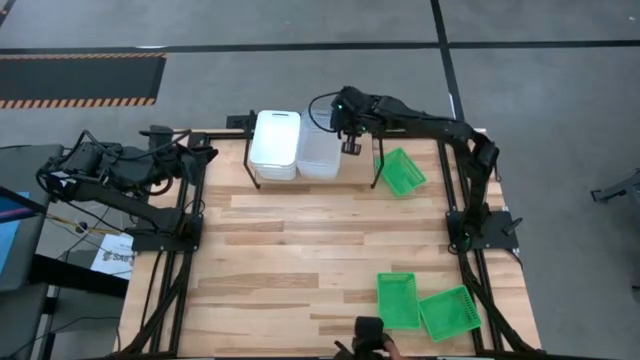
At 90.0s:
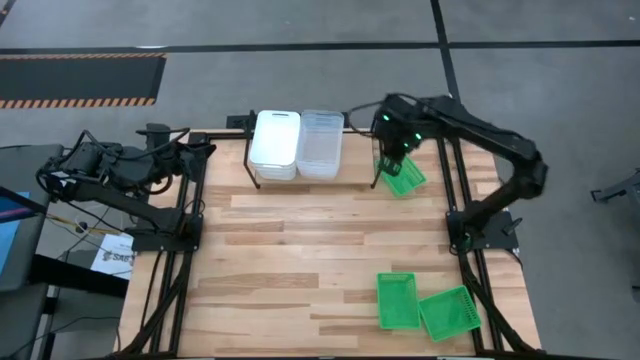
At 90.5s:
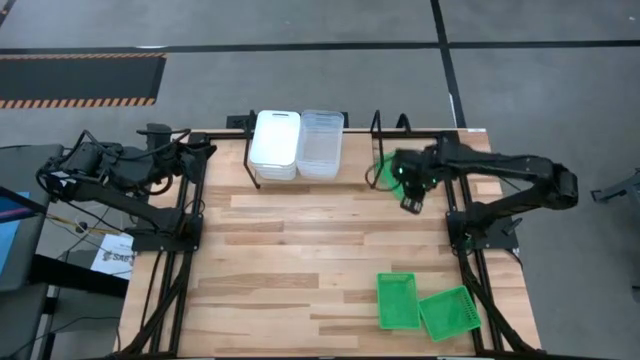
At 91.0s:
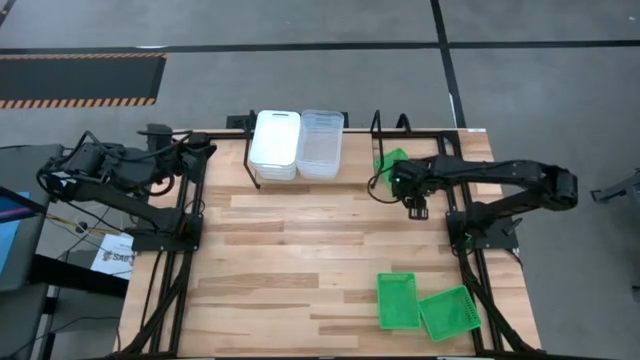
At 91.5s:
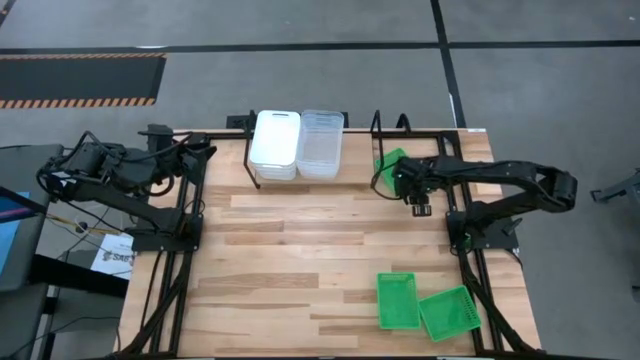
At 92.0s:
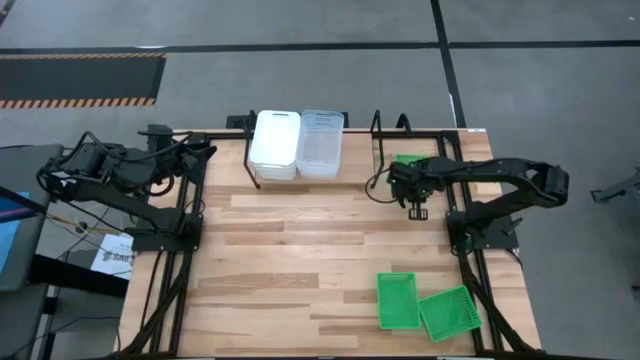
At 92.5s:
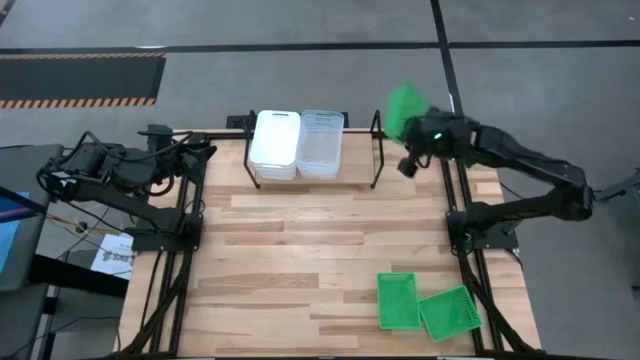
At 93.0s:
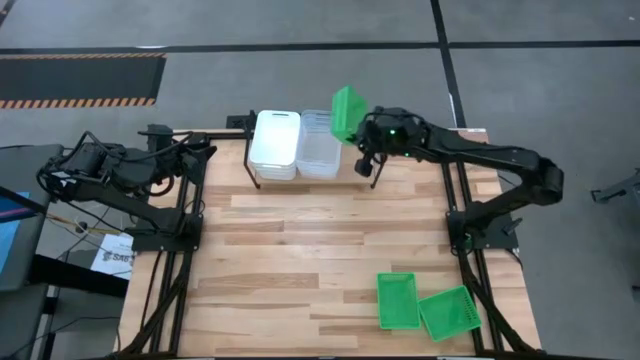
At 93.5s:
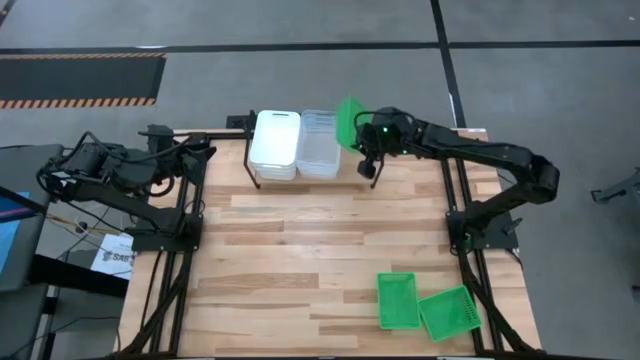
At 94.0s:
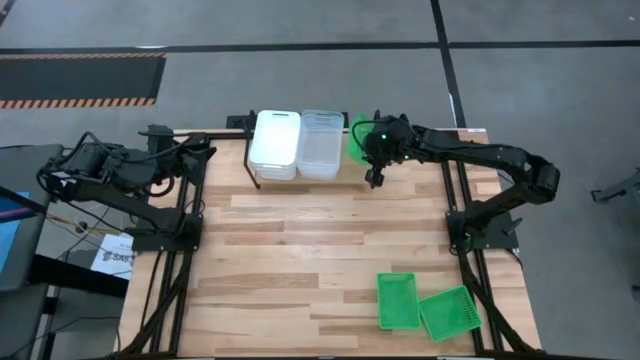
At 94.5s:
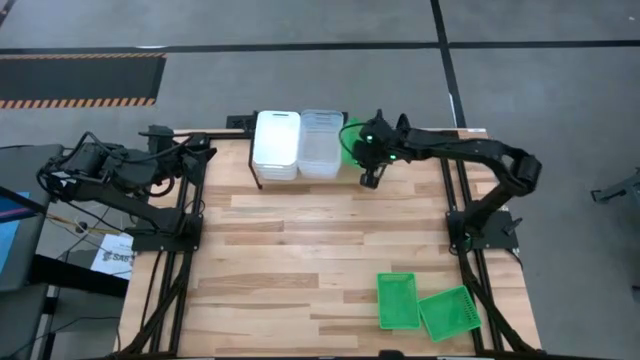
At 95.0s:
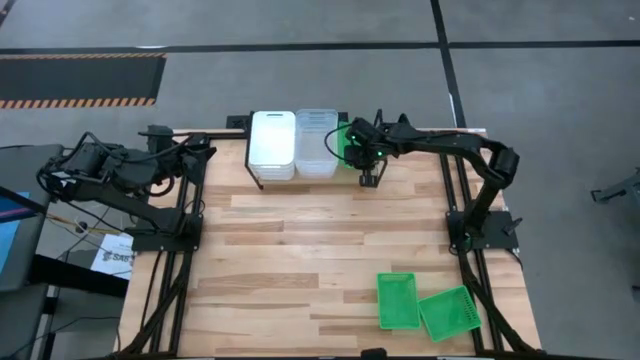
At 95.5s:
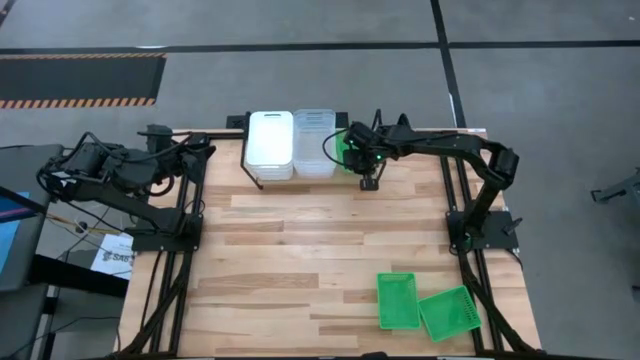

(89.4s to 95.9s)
Task: Stack baskets on shelf by color
Put the top green bin on the shelf

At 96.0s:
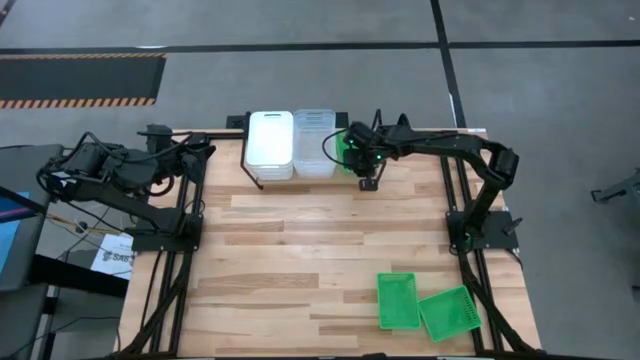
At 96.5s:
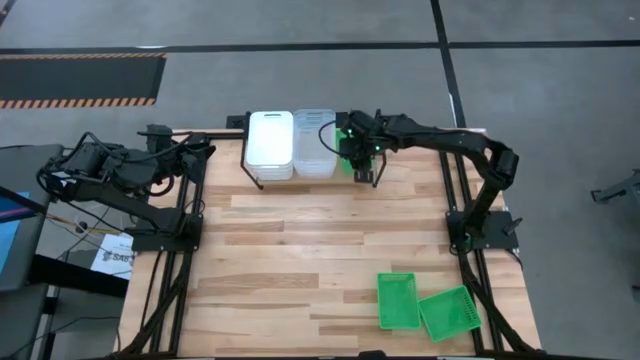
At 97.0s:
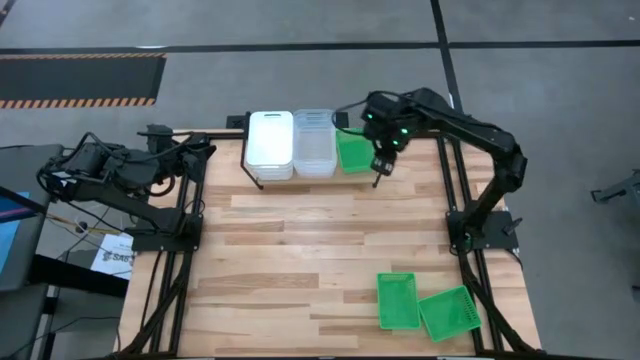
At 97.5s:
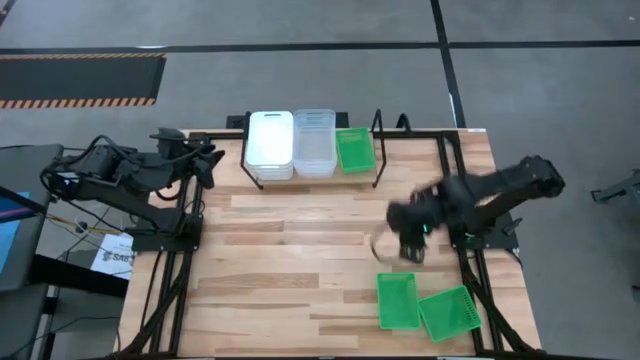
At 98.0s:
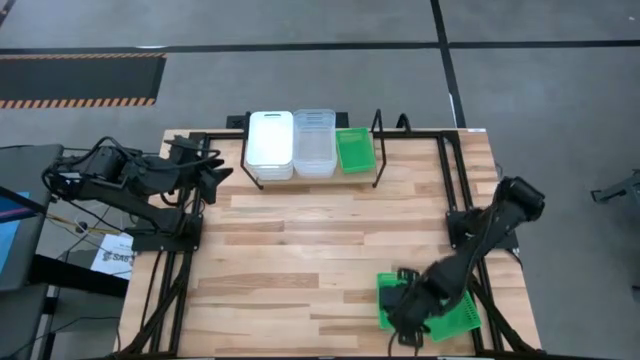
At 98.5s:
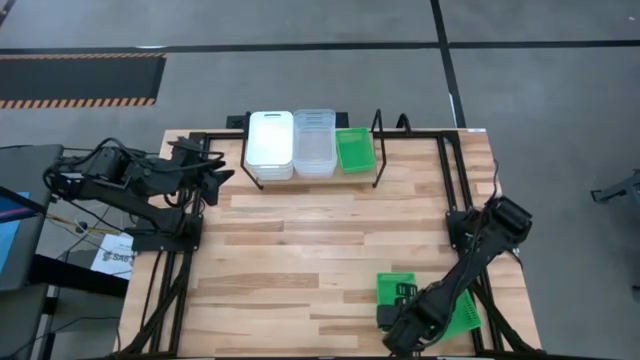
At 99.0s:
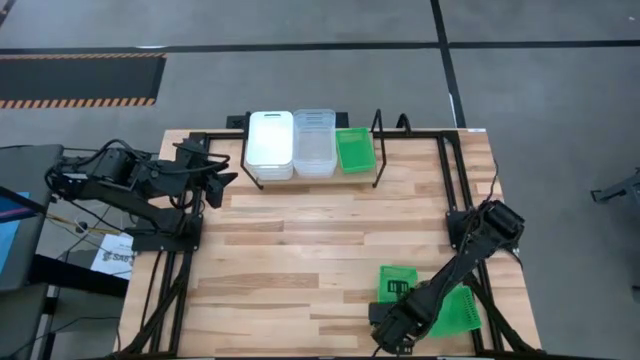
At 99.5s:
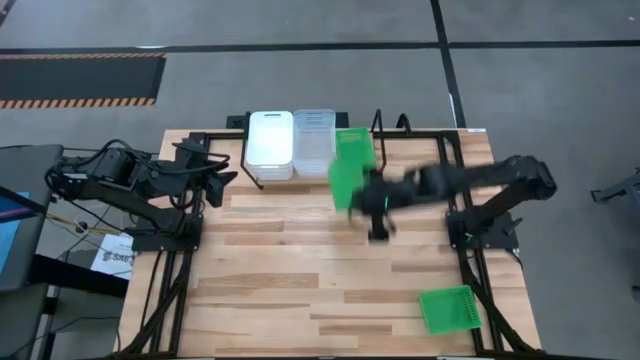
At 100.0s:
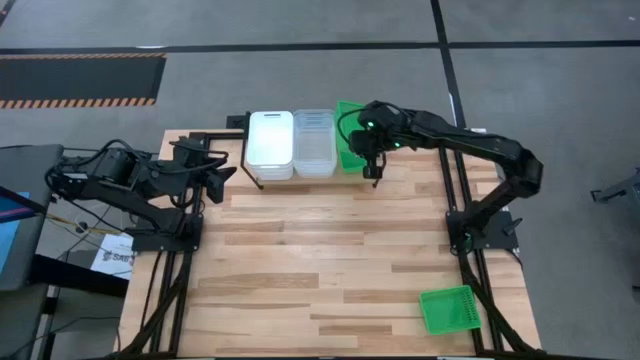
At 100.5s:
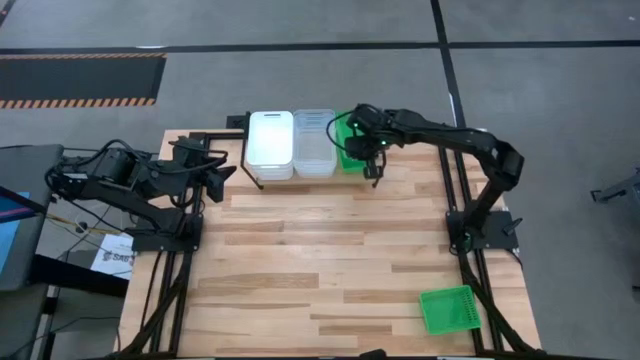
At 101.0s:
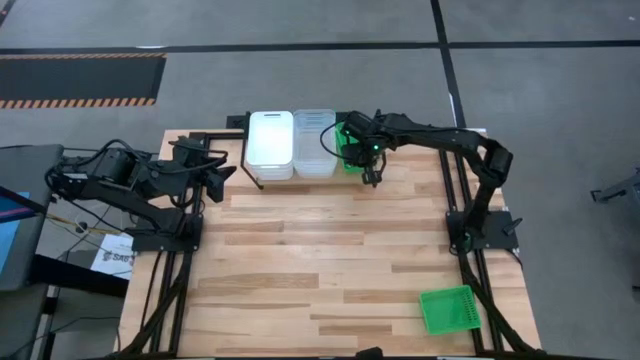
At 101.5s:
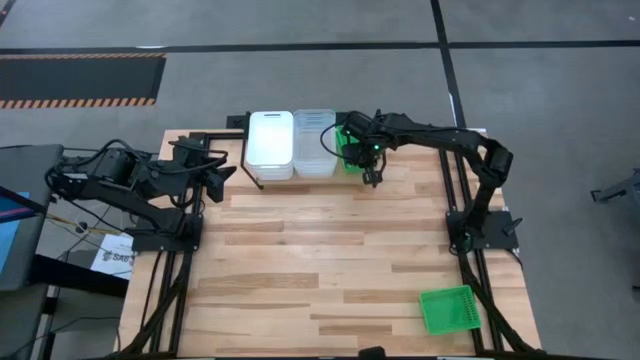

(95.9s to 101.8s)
Stack the left green bin on top of the green bin on the shelf

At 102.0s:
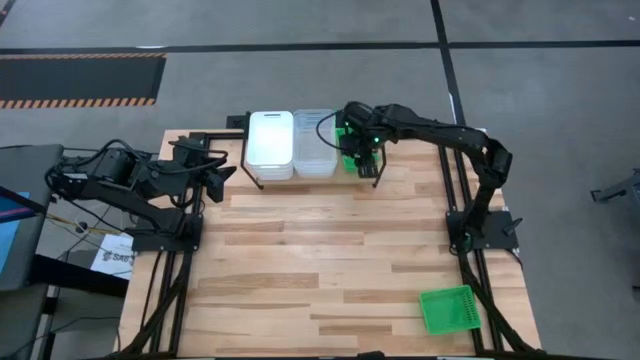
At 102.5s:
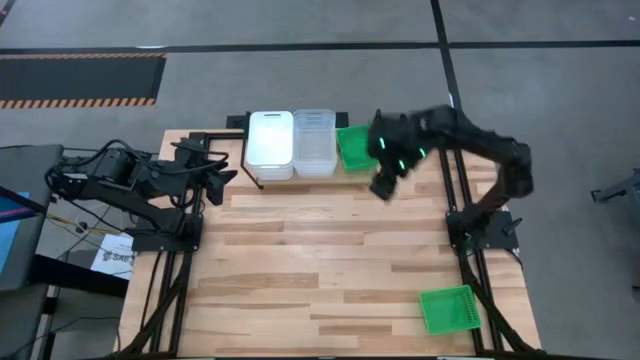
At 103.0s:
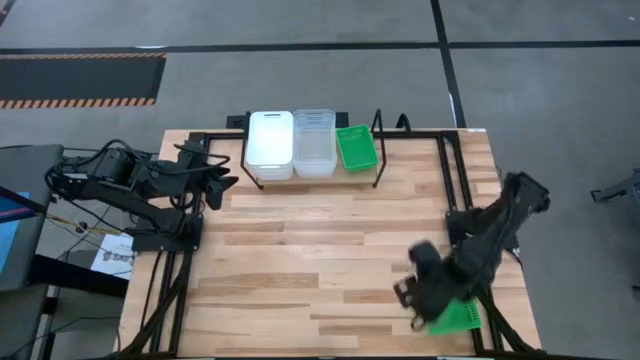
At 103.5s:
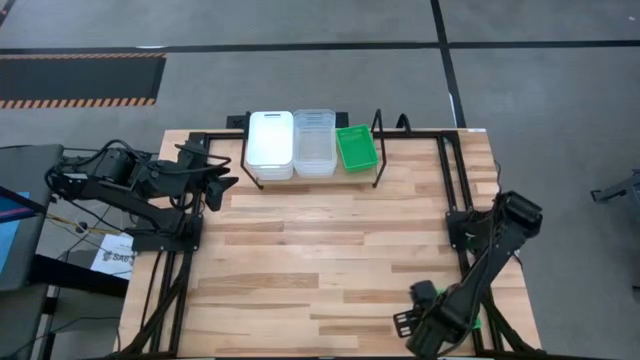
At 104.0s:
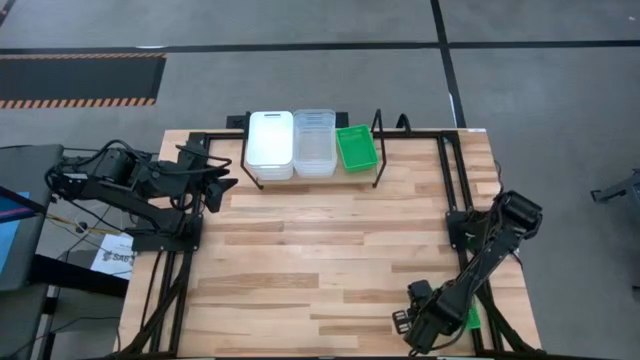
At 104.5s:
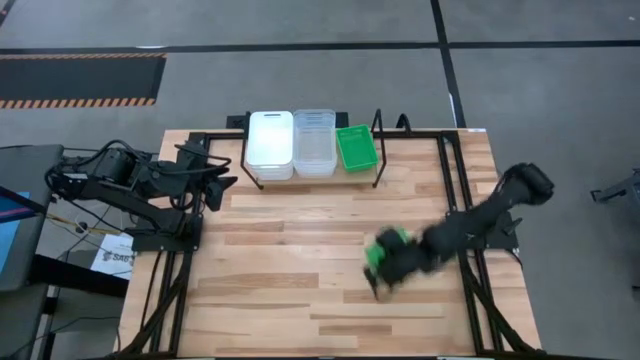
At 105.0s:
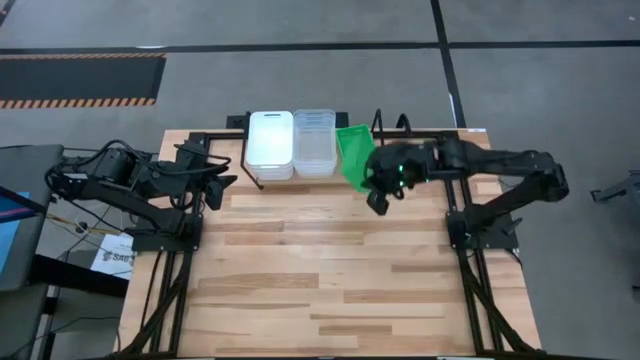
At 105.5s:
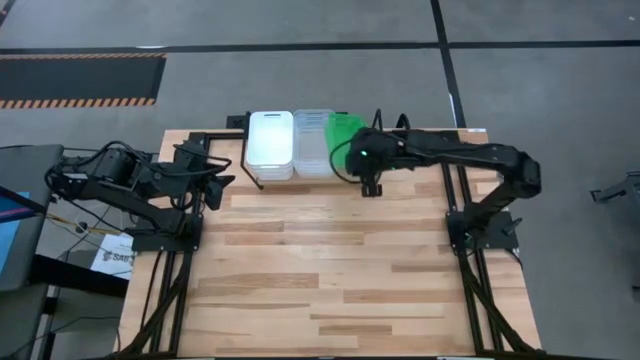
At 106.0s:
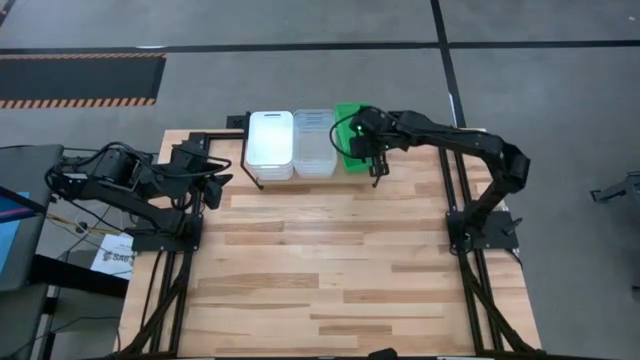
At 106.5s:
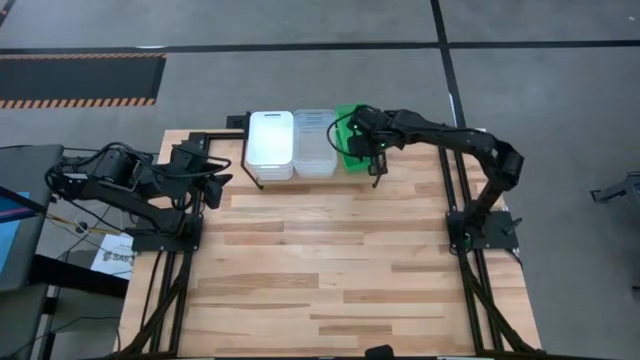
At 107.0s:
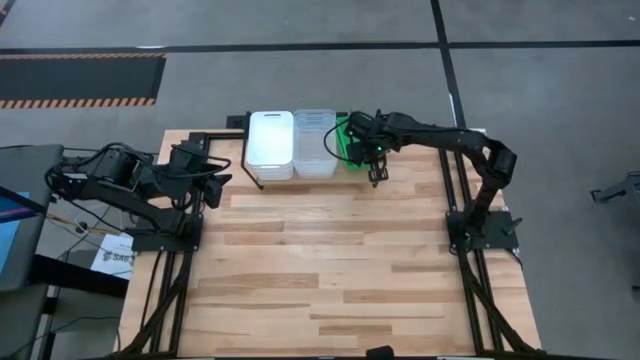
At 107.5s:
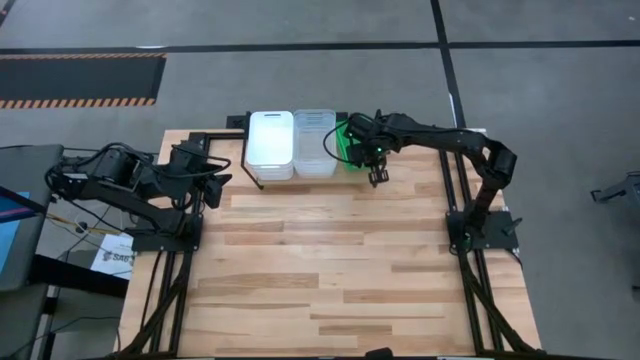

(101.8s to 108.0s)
Stack the green bin on top of the green bins on the shelf

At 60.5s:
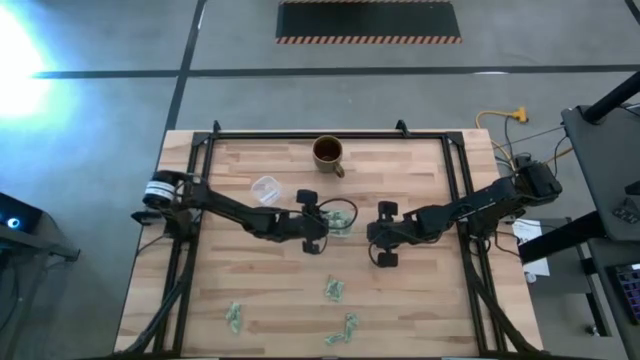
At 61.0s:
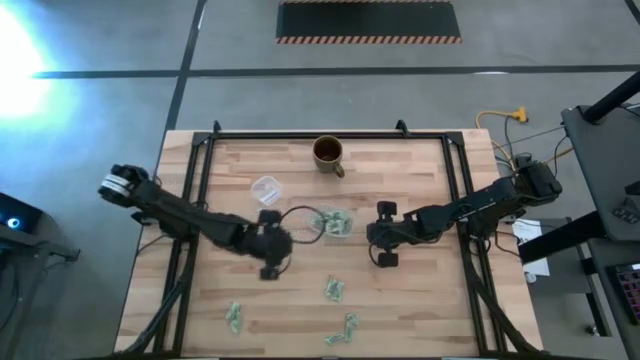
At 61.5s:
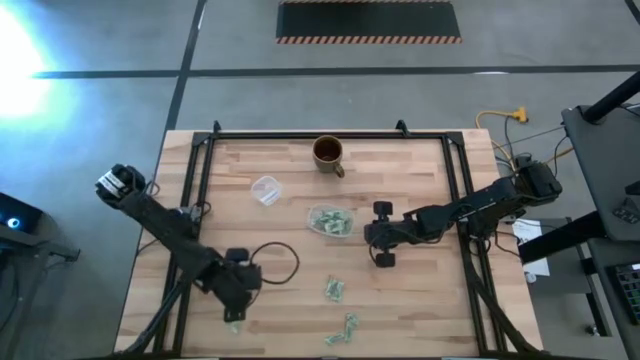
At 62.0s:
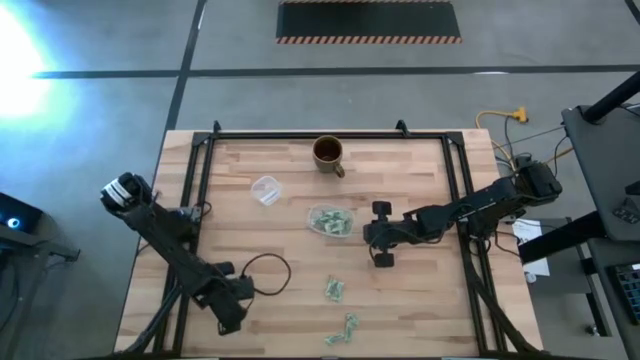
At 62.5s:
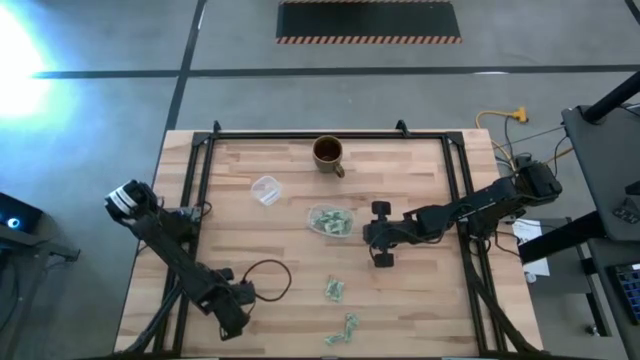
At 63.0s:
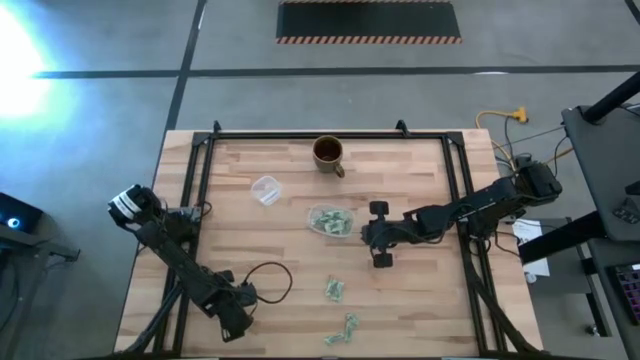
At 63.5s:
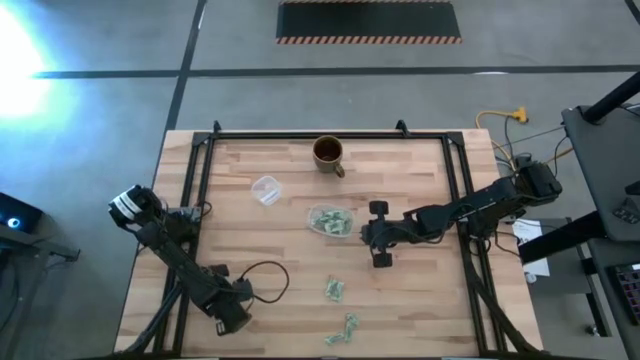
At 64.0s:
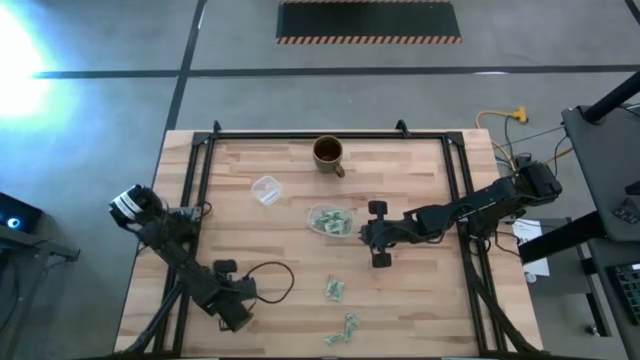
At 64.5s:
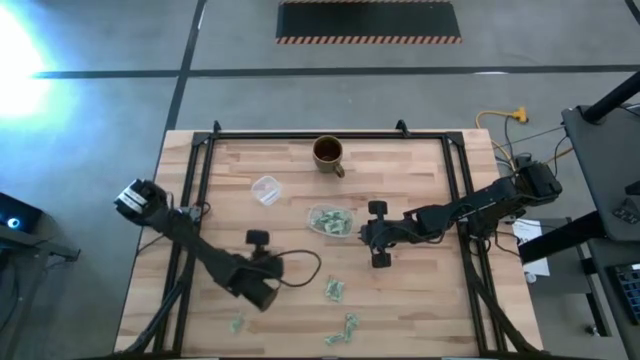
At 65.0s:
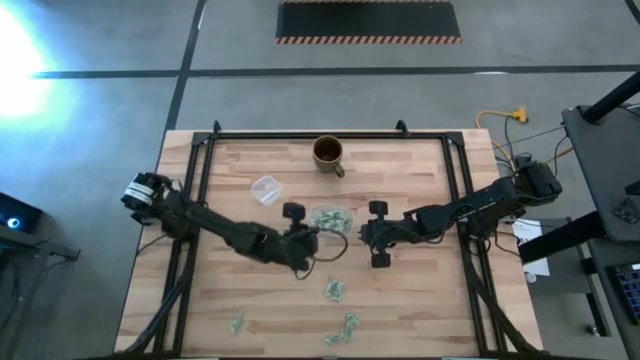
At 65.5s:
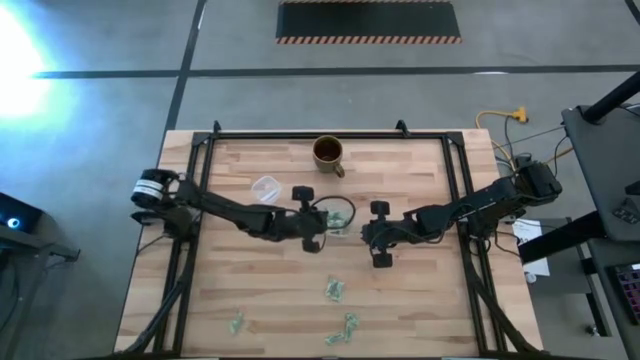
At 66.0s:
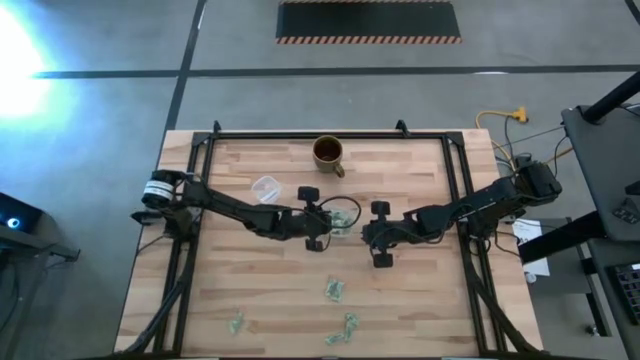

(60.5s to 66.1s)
Task: Pick and place Stevia / Truvia into bins
Put the green stevia packet into the transparent container
